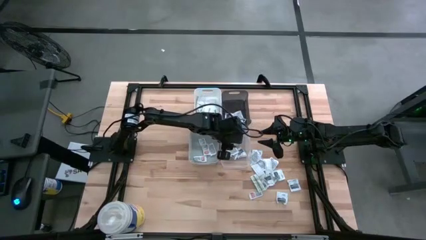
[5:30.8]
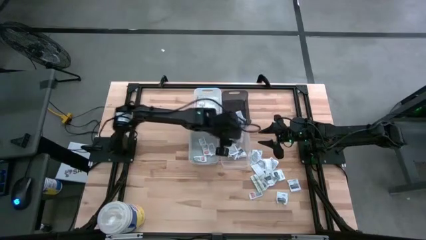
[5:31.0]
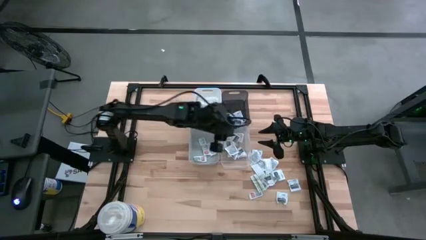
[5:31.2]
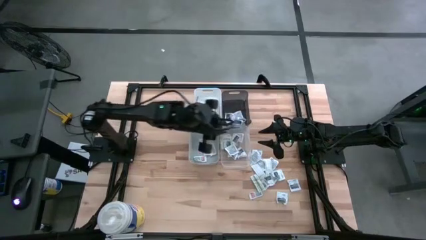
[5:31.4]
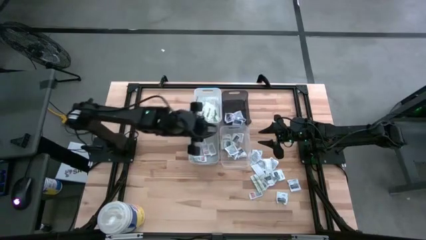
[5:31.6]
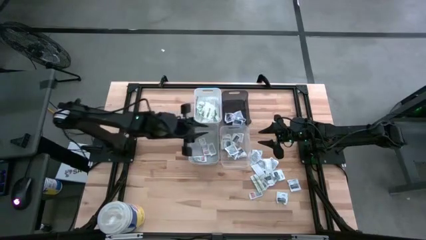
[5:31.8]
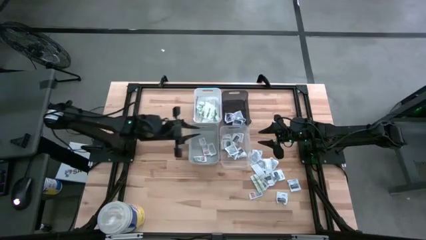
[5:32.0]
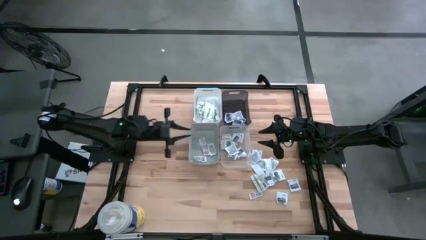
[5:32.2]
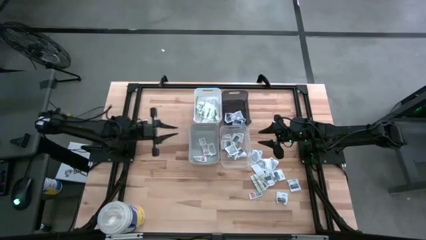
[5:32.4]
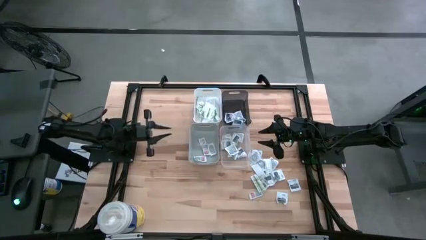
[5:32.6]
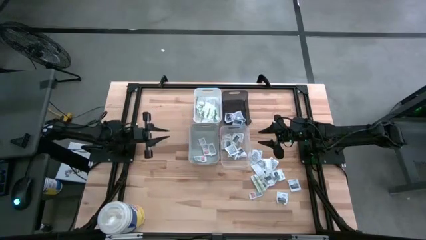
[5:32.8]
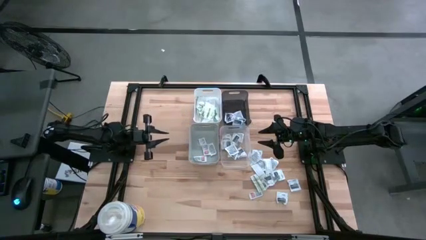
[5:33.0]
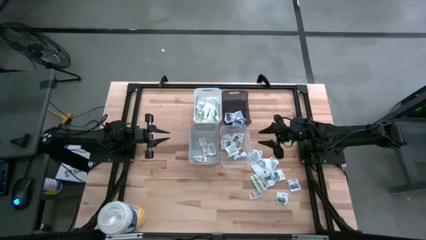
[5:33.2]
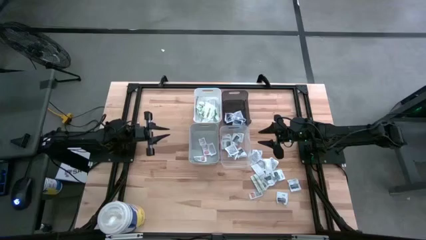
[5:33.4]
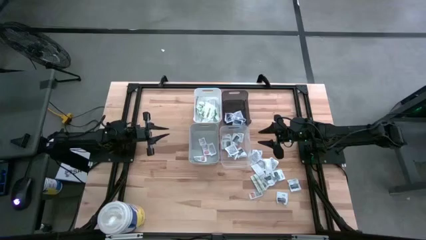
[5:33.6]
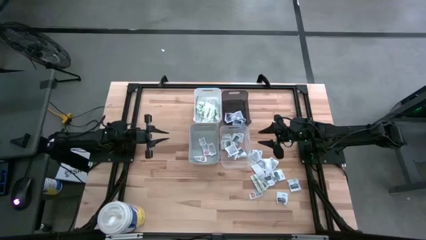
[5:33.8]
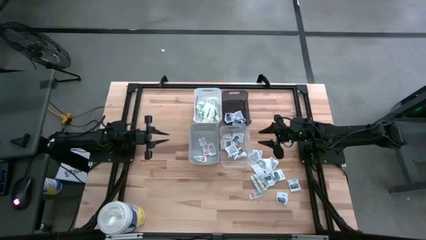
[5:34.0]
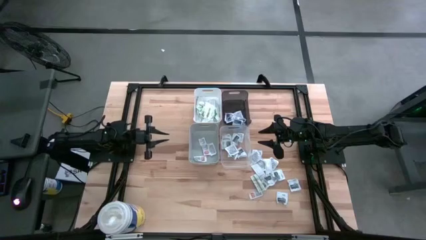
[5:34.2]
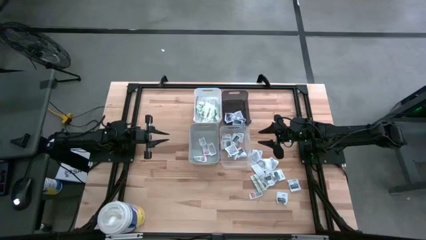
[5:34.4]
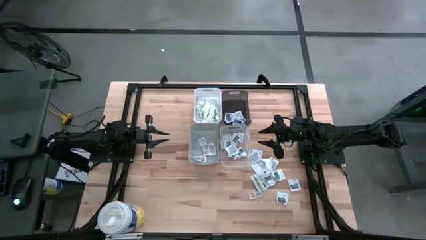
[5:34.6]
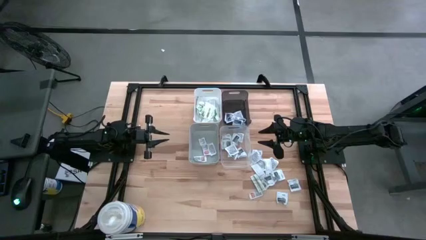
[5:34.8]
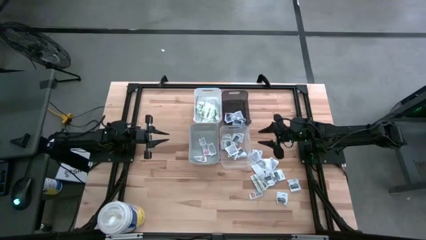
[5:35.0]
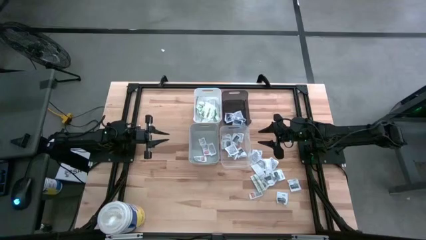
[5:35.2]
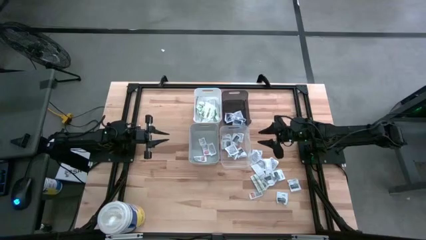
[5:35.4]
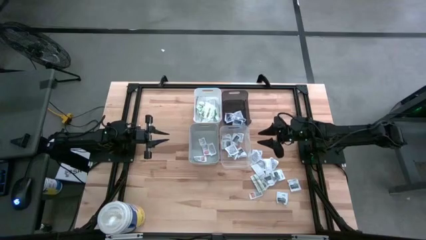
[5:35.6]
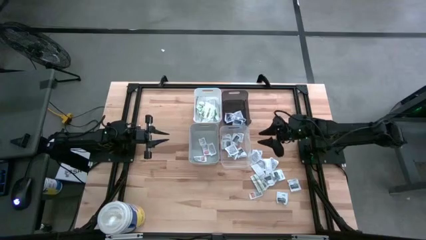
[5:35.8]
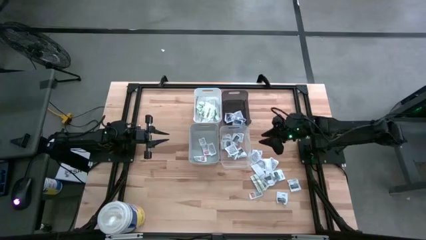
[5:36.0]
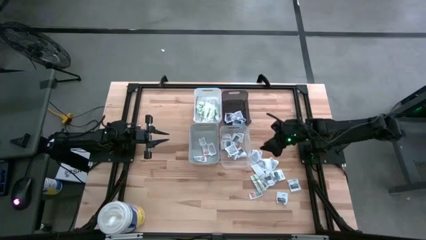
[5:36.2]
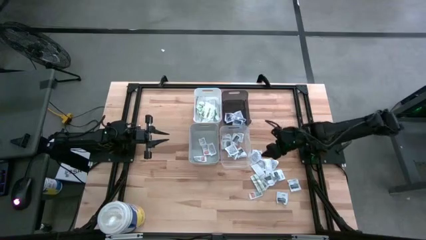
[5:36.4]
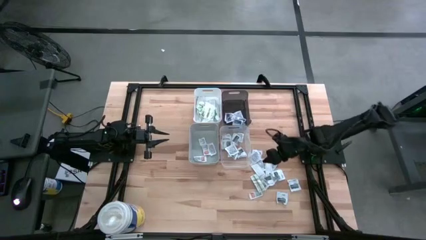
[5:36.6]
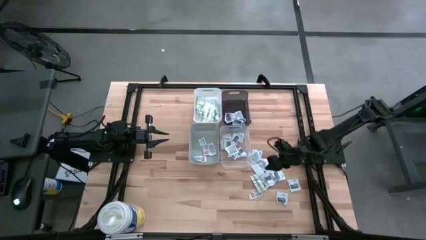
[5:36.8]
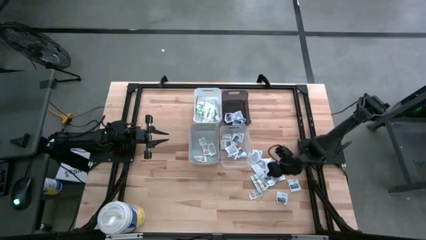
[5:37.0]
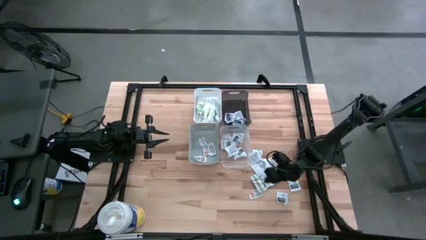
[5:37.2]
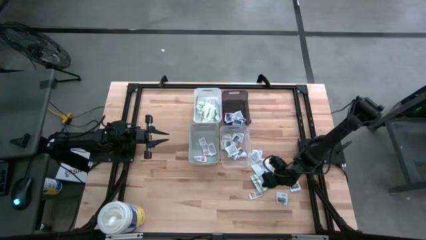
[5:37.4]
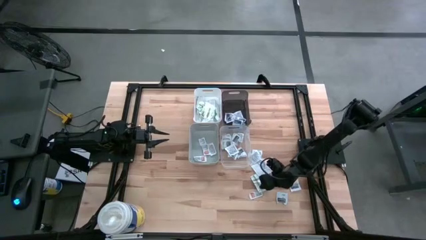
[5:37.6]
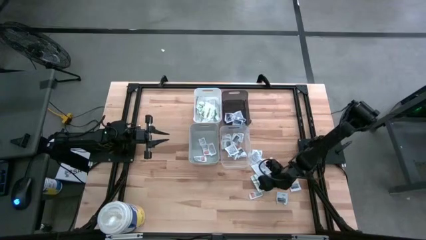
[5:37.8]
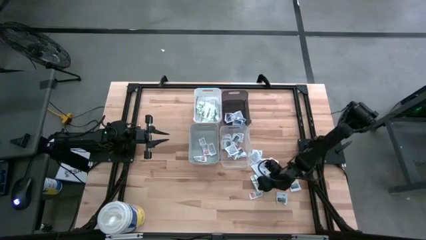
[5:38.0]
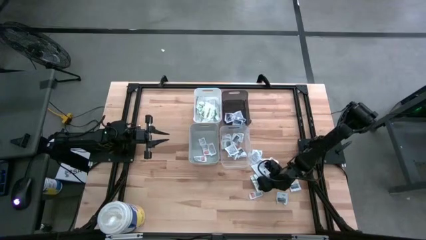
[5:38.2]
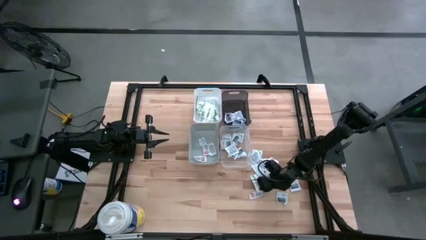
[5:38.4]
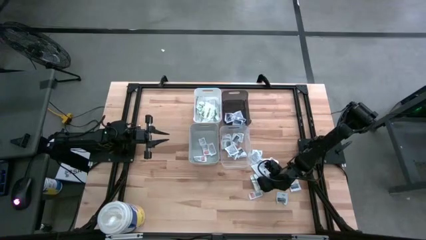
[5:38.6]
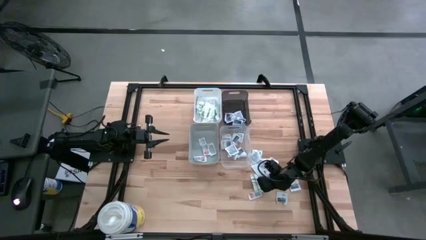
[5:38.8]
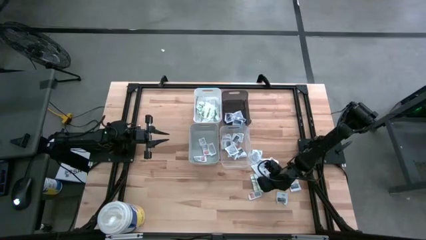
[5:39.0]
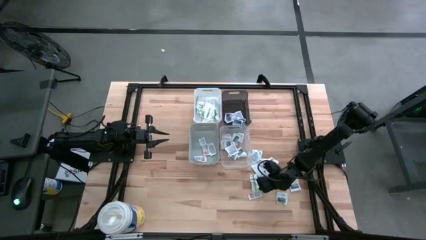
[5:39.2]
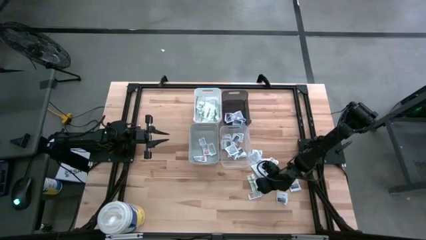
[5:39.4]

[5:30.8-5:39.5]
Task: Pick & Place First Aid Supplies
Put the green bandage pack into the white bin

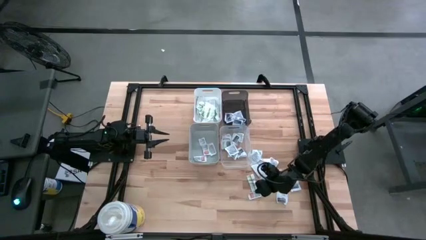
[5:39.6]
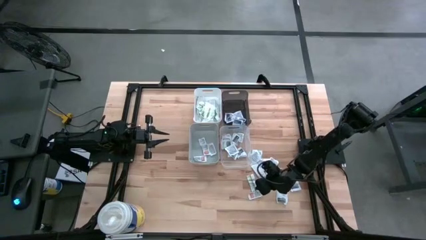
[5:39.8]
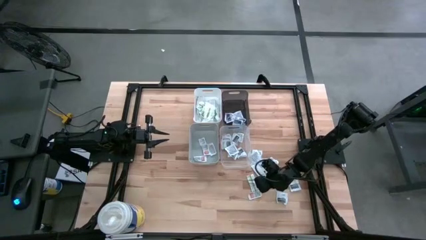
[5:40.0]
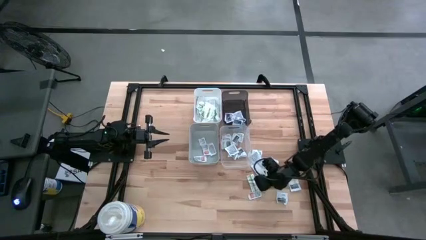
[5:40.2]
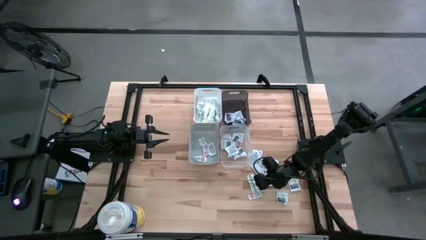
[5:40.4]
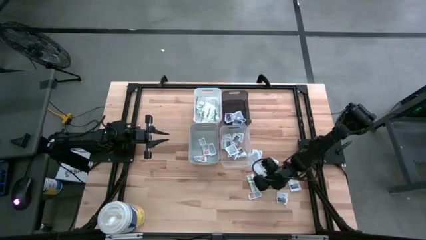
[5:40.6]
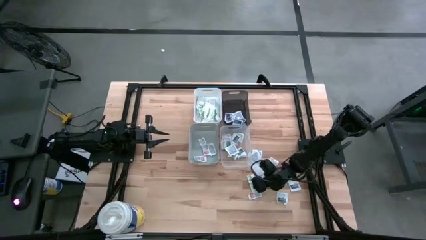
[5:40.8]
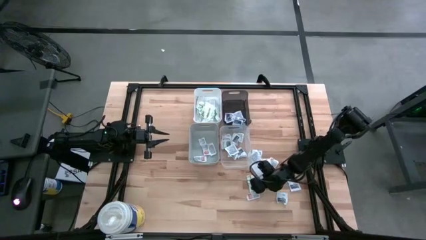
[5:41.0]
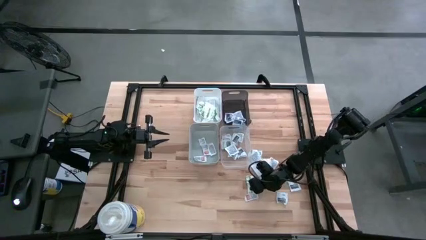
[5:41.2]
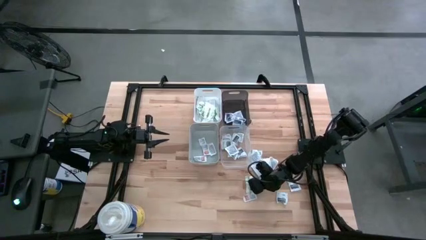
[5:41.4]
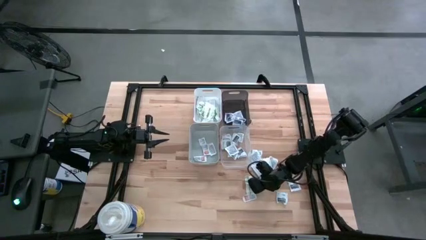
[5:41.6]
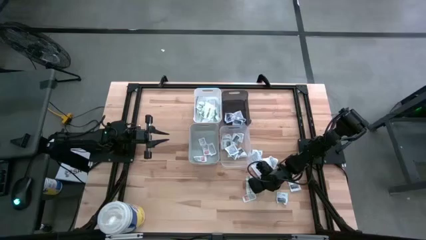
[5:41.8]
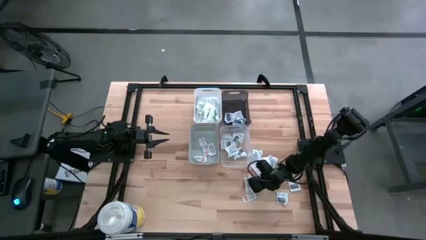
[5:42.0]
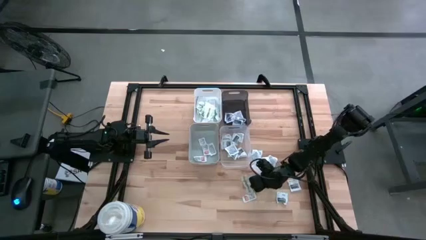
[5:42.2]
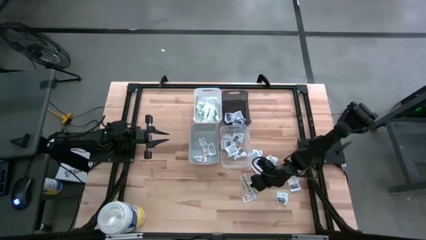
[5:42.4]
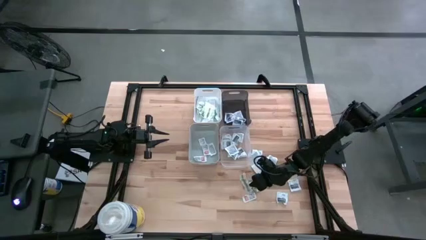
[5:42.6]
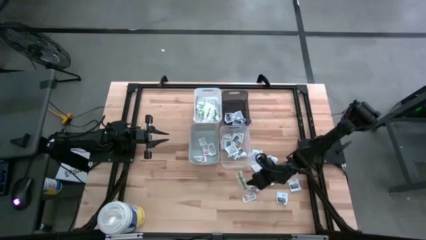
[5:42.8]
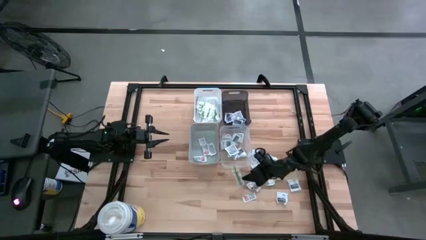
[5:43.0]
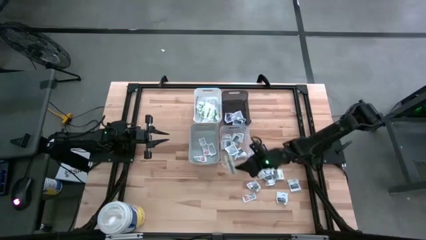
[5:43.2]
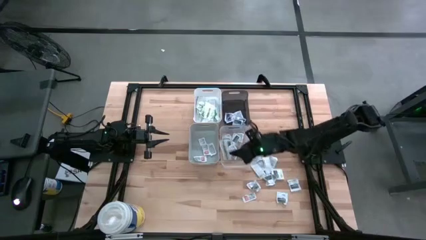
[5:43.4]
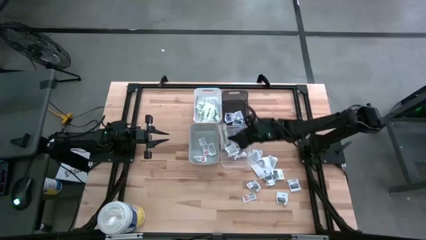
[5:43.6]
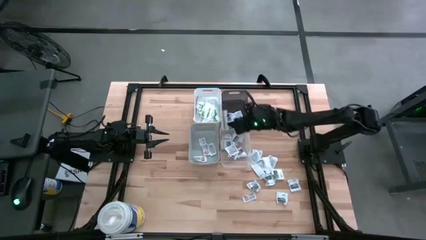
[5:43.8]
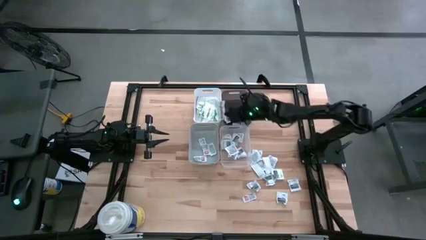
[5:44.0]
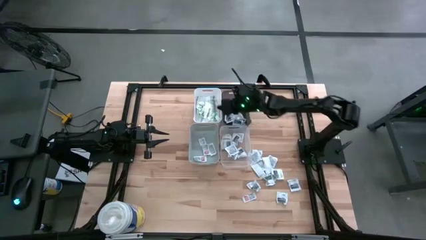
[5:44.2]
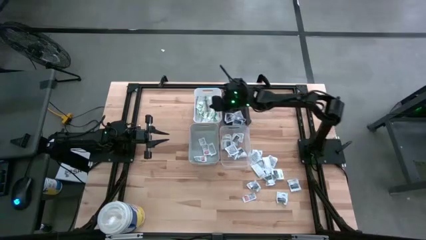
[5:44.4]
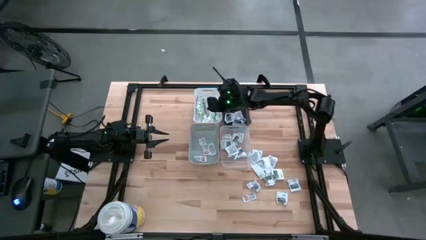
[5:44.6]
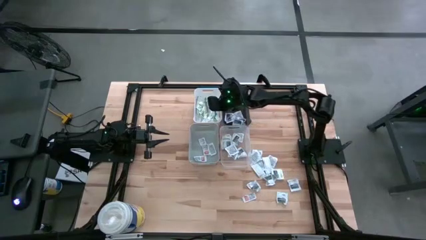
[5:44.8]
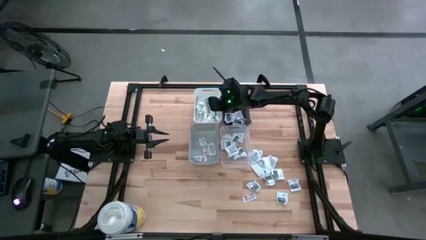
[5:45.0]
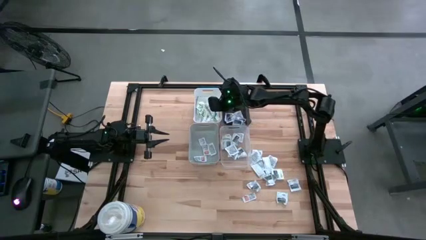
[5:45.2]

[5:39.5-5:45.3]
Put the green bandage pack into the white bin
